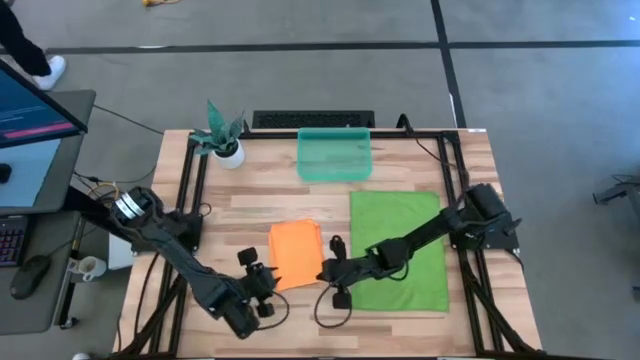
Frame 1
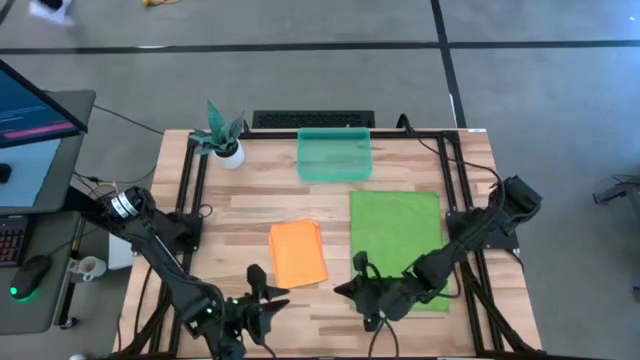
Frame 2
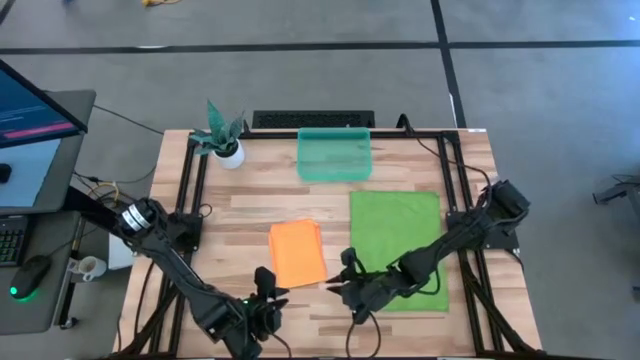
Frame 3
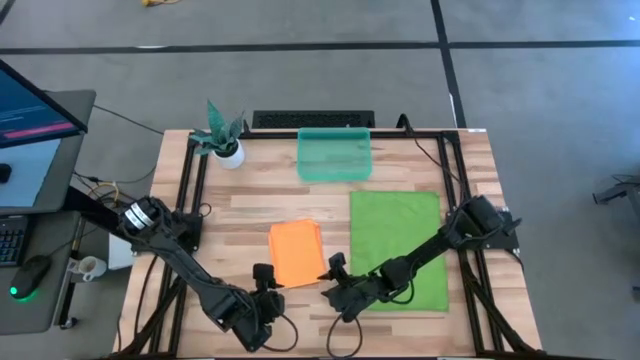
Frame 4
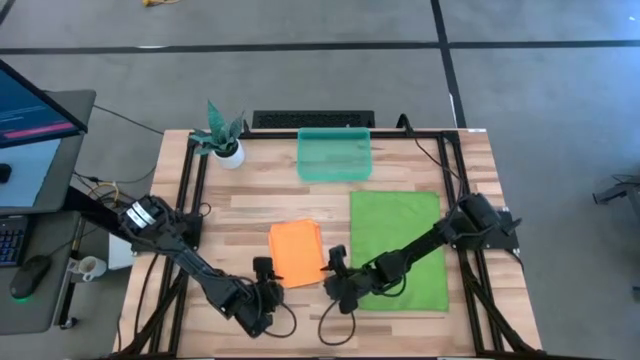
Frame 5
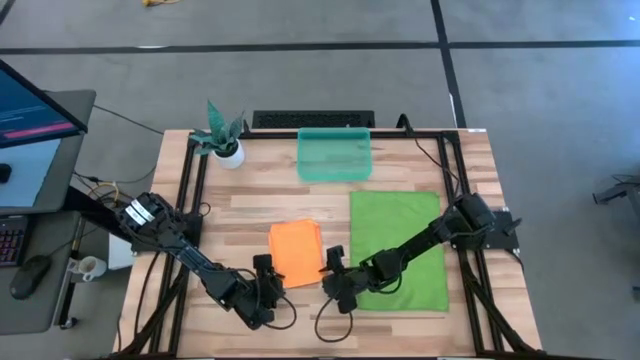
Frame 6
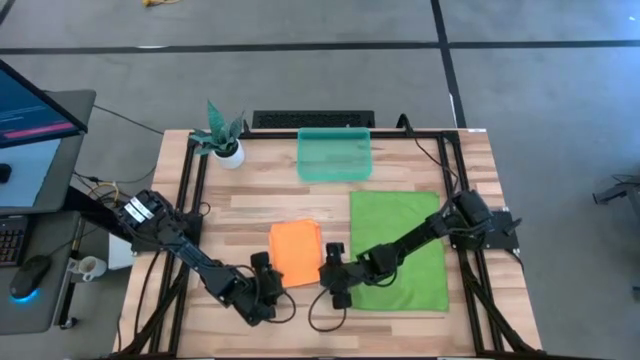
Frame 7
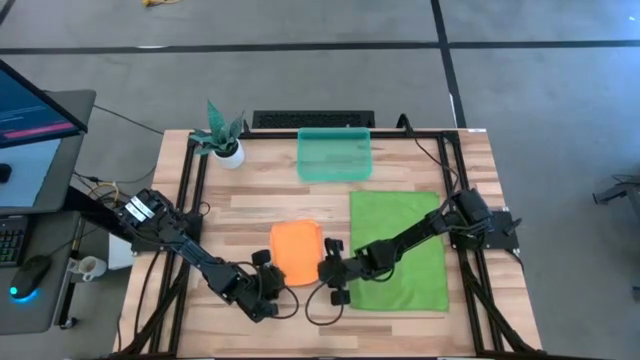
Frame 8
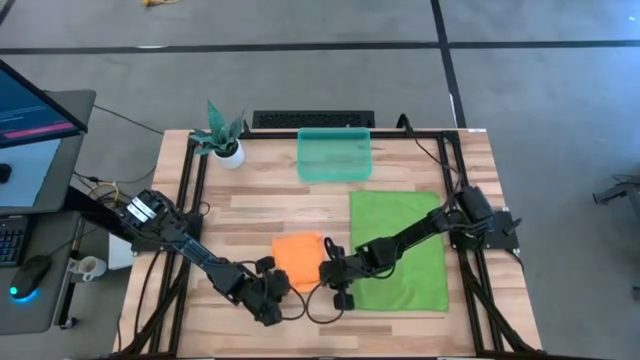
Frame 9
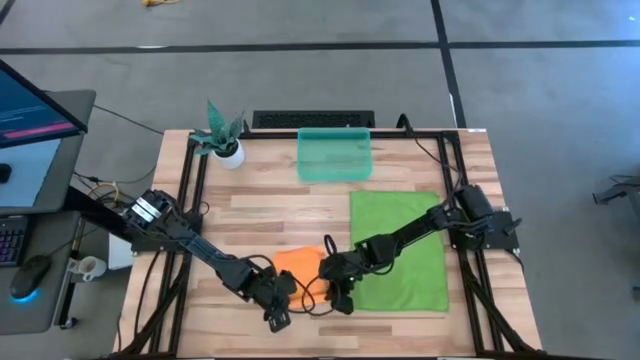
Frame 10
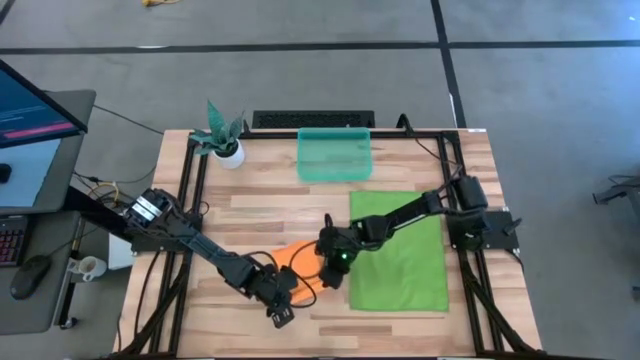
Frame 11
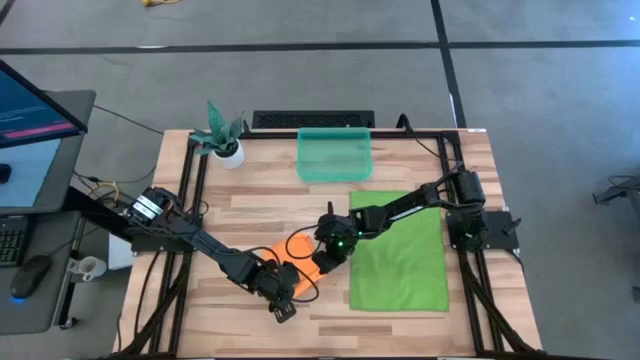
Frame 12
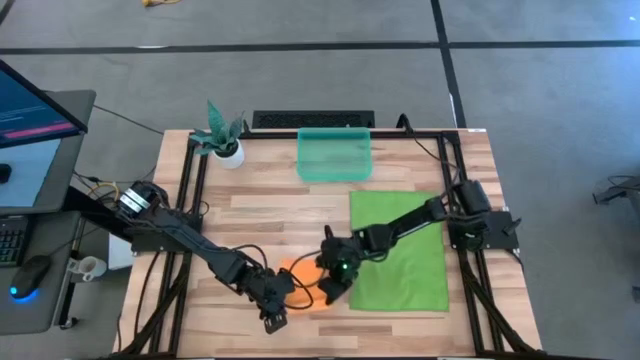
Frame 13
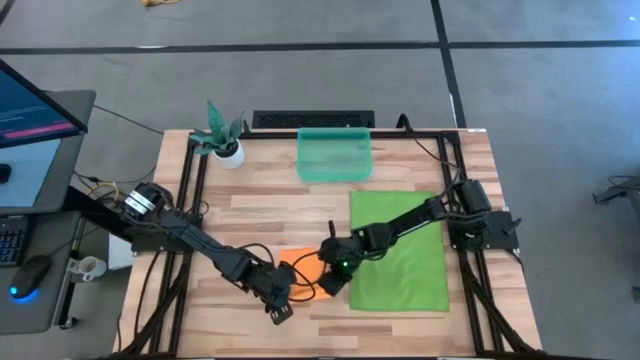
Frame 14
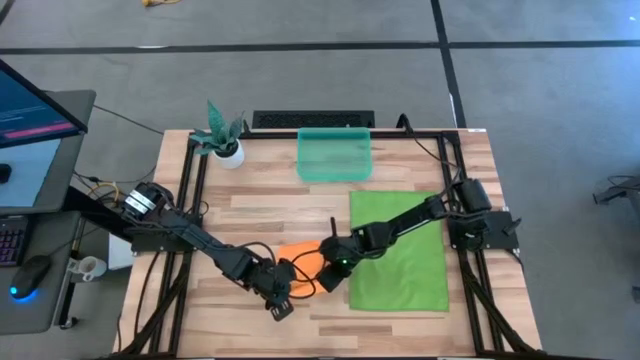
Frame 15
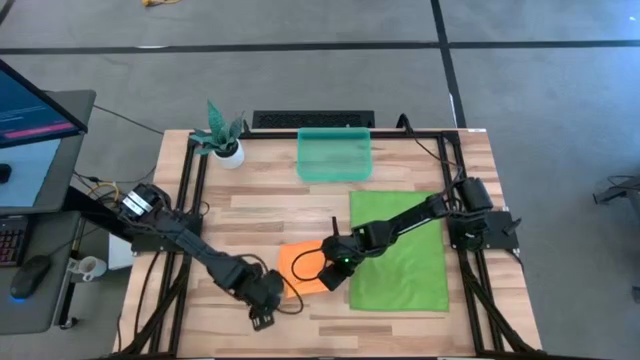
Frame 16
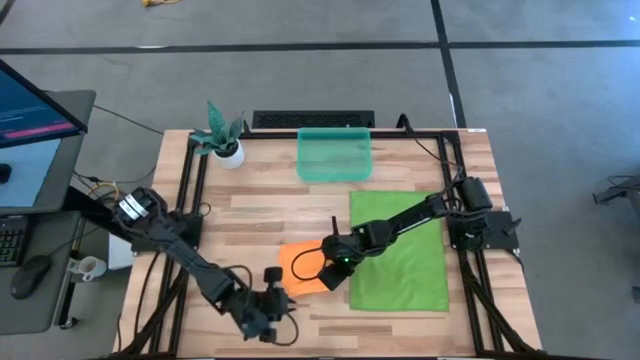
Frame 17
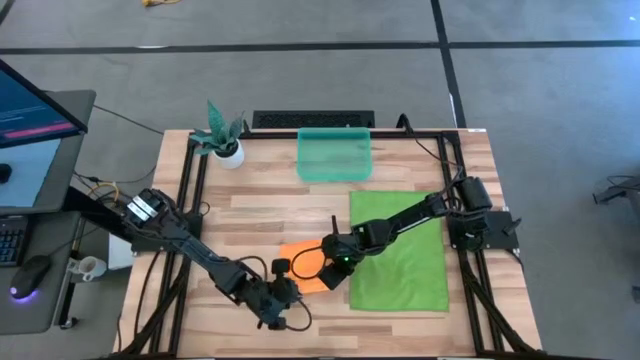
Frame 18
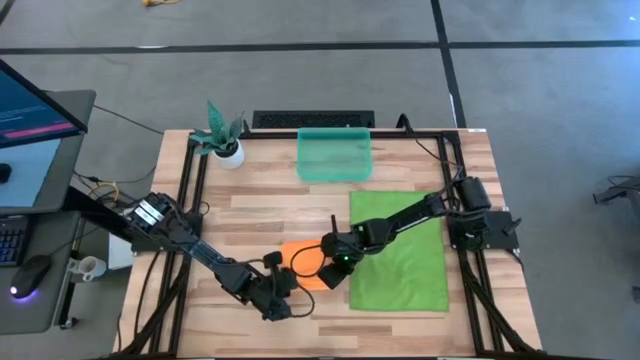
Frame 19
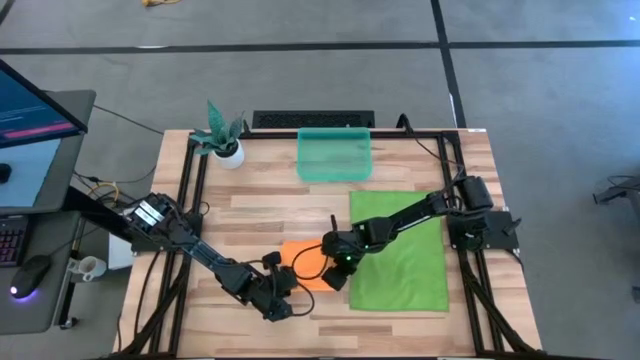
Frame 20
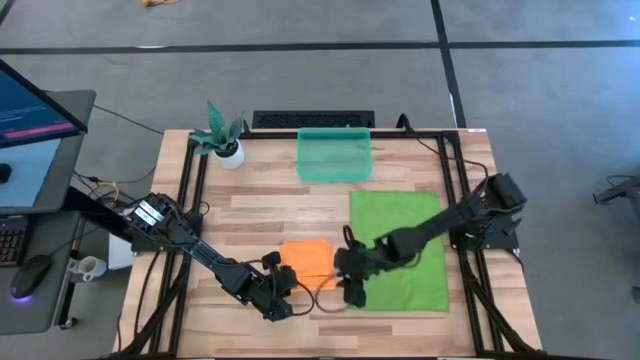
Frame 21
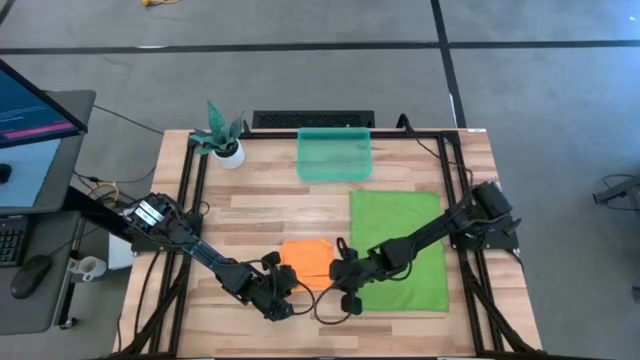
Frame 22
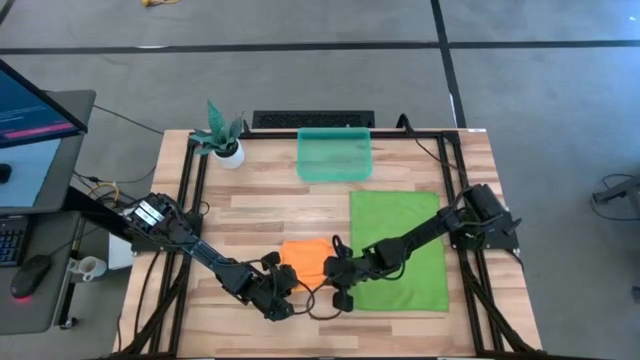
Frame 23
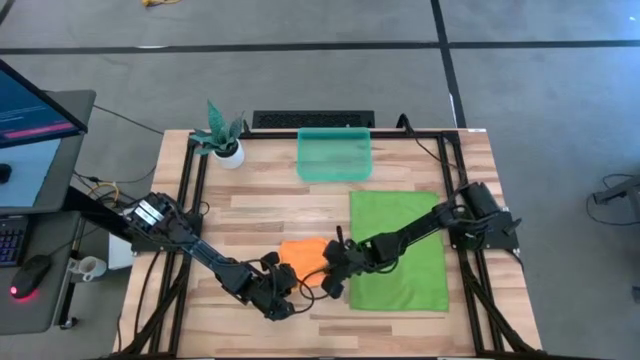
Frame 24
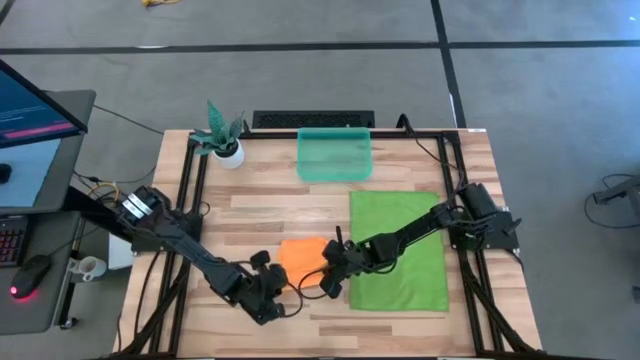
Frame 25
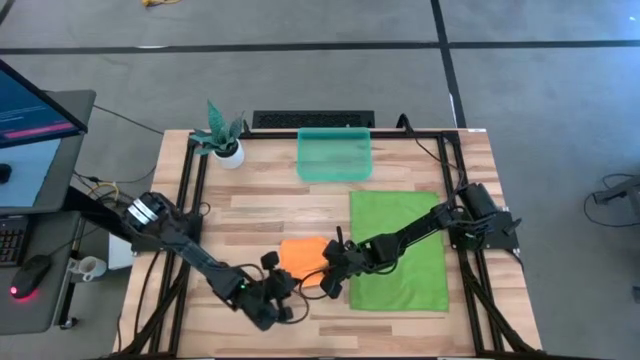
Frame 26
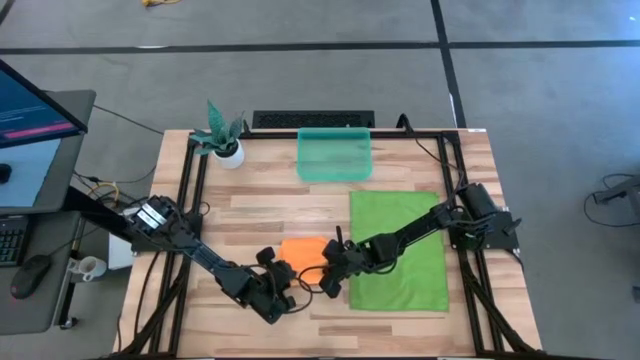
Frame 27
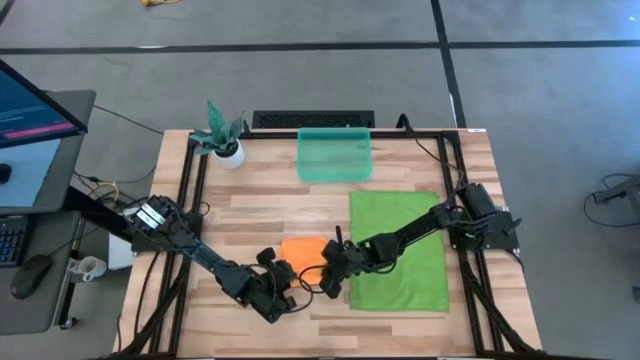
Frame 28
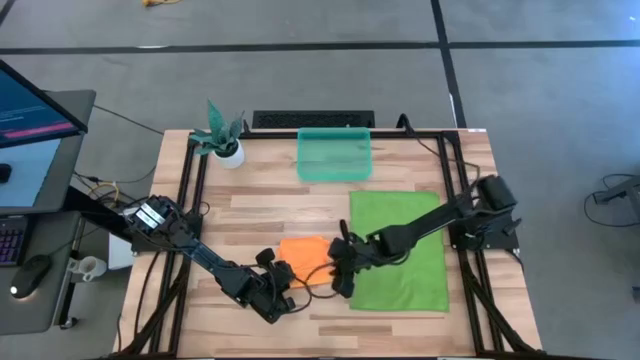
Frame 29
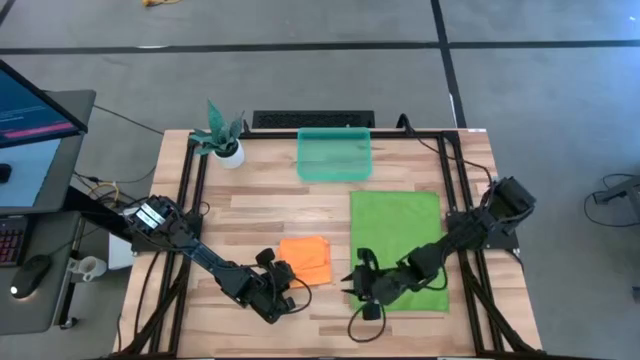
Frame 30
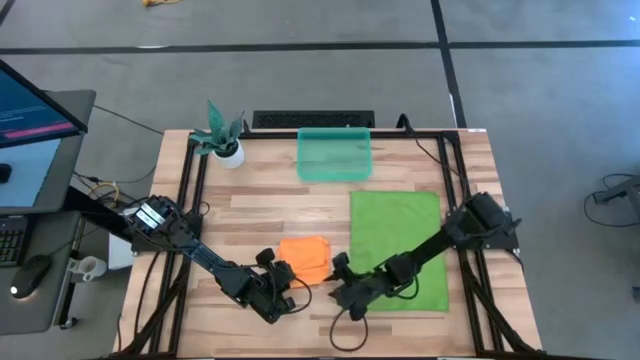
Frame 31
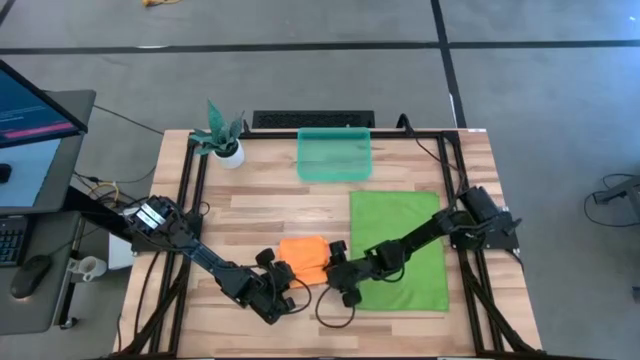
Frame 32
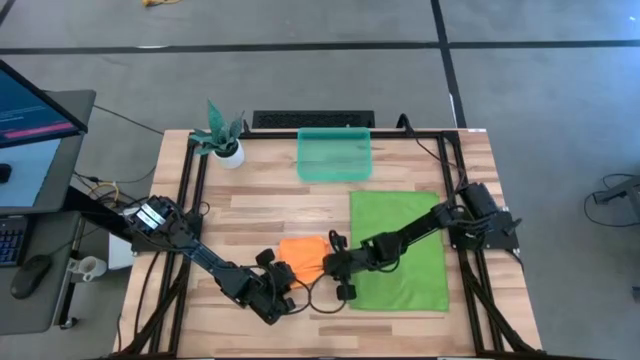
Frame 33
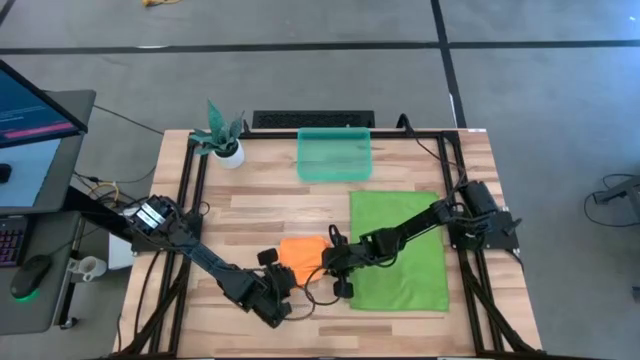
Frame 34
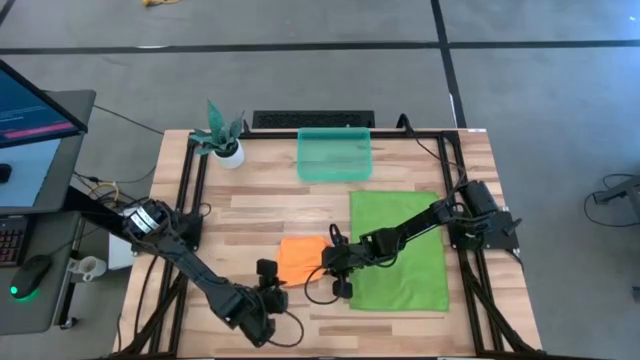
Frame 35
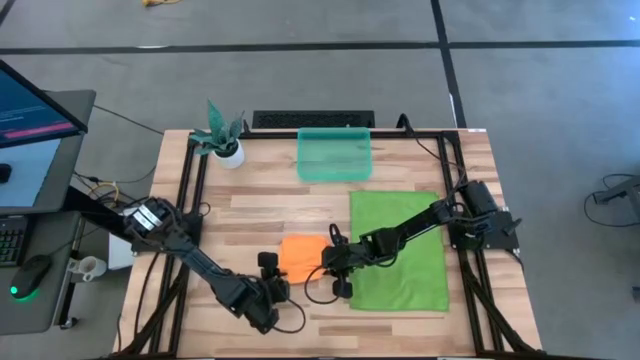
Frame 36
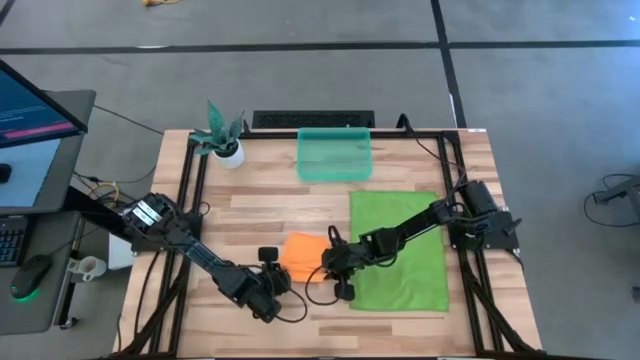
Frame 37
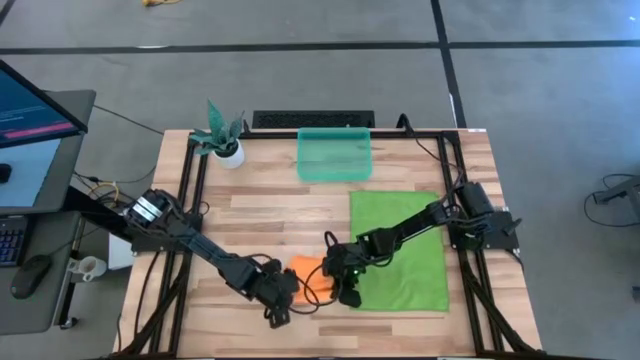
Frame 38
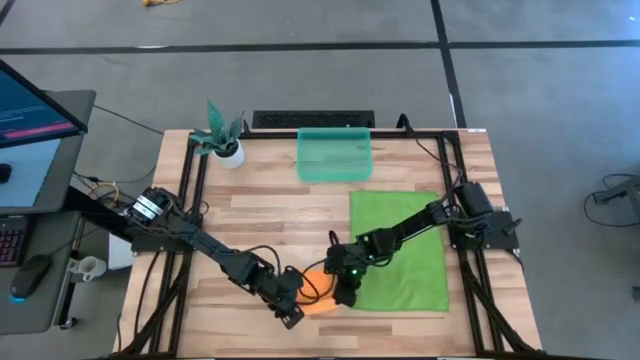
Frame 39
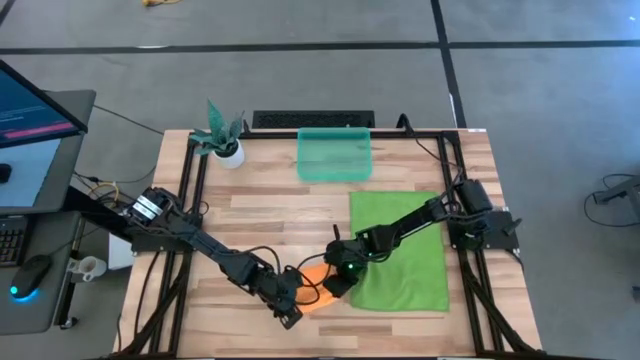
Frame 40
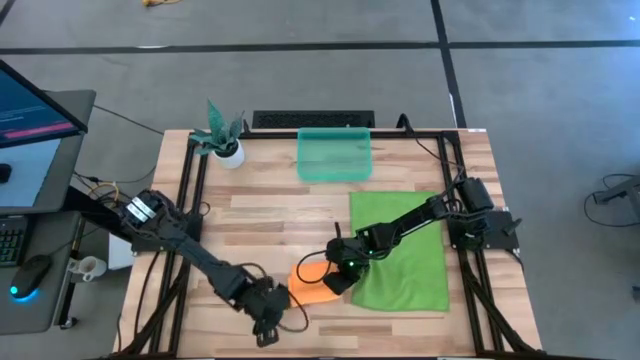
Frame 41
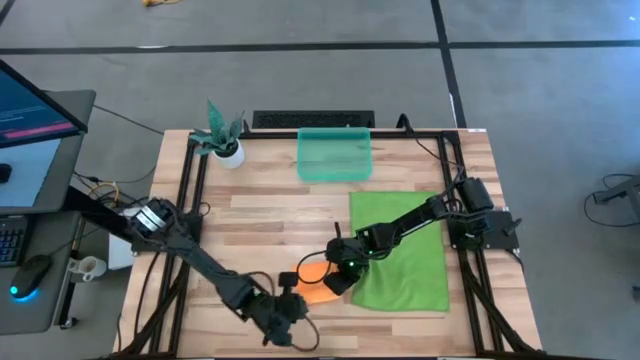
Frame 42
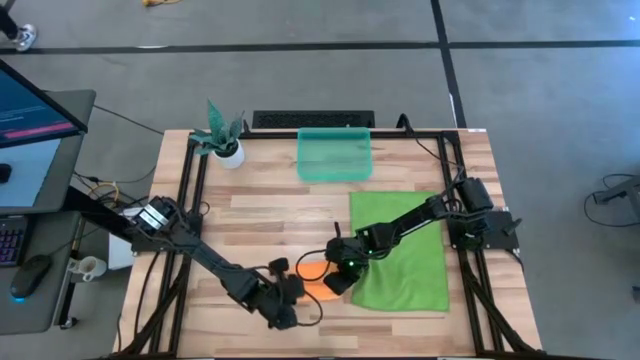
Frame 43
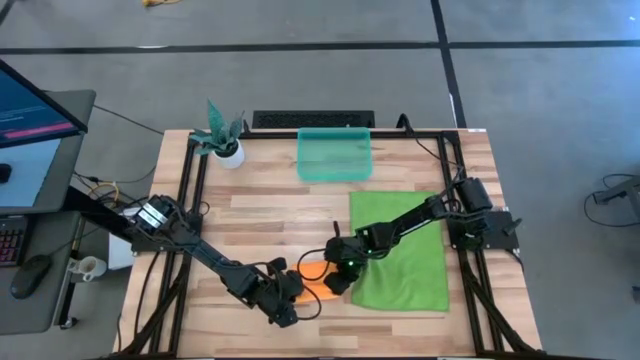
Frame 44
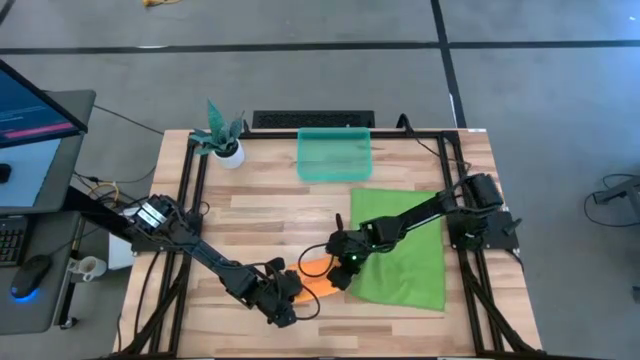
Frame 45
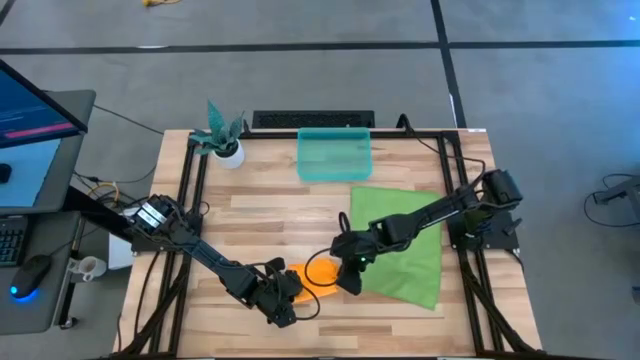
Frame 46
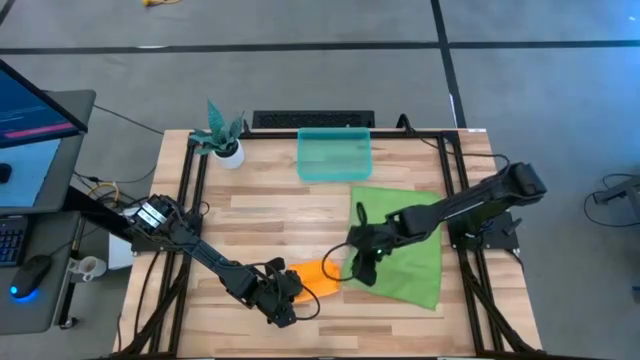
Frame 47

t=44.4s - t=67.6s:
Task: Roll microfiber towels into tight, uniform cylinder then place into a basket
Roll the orange towel
